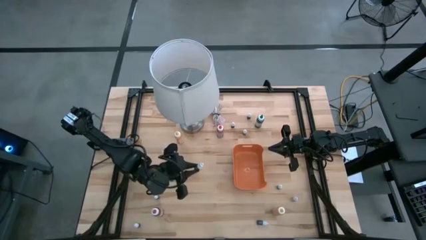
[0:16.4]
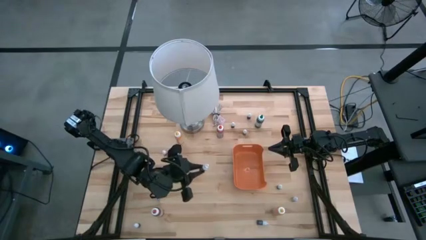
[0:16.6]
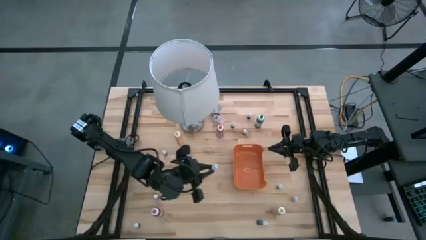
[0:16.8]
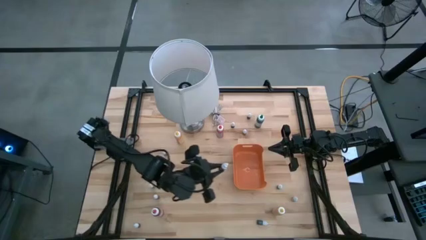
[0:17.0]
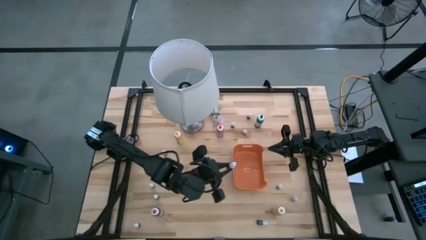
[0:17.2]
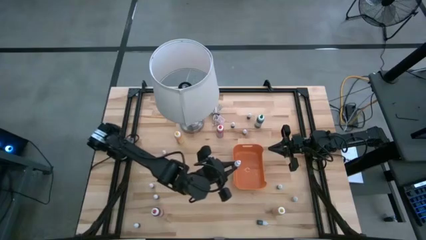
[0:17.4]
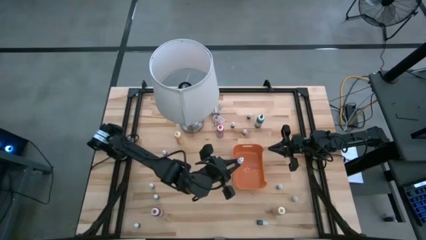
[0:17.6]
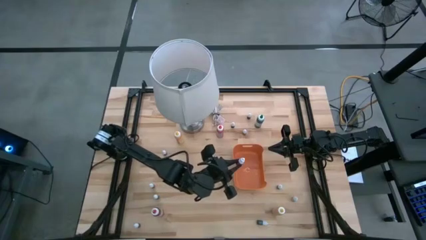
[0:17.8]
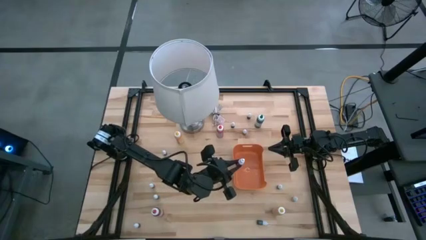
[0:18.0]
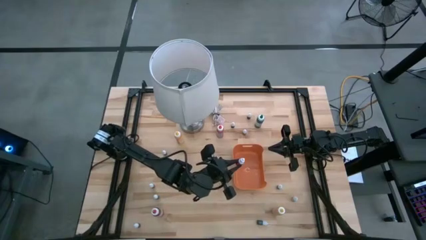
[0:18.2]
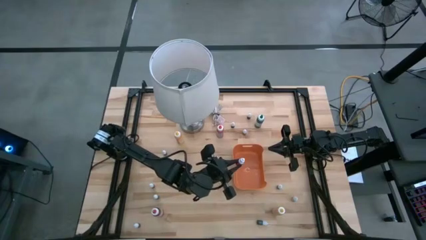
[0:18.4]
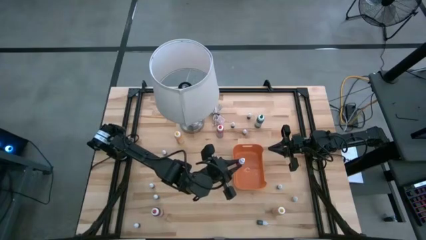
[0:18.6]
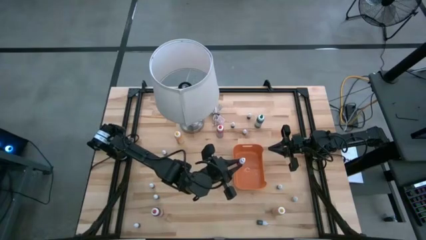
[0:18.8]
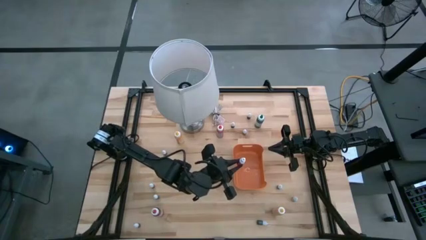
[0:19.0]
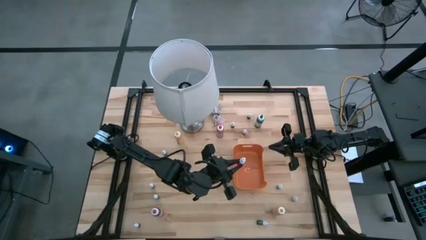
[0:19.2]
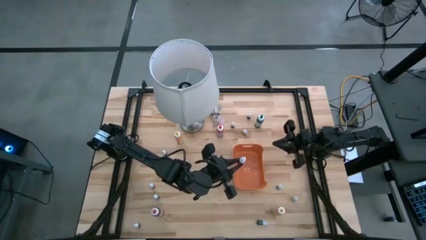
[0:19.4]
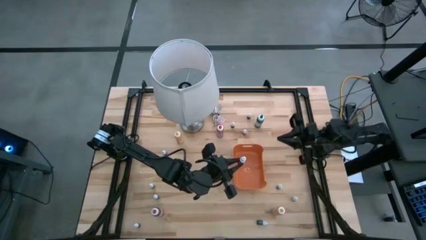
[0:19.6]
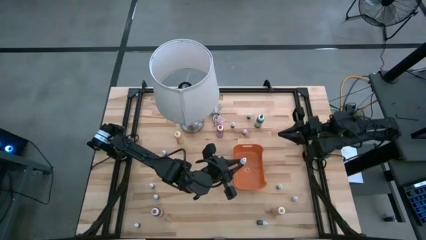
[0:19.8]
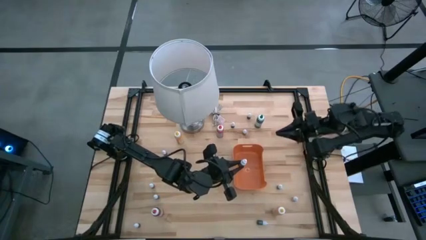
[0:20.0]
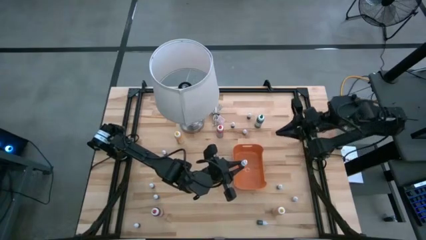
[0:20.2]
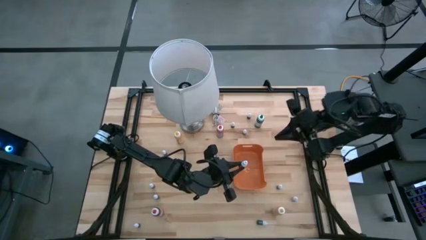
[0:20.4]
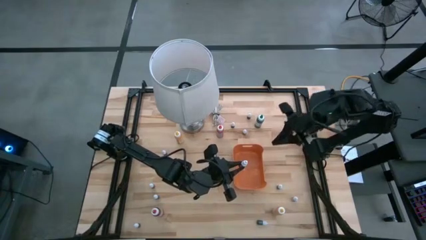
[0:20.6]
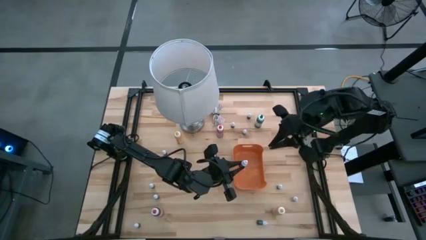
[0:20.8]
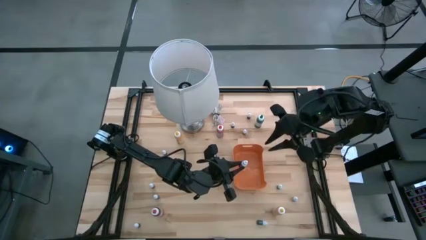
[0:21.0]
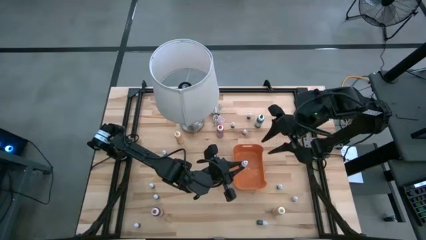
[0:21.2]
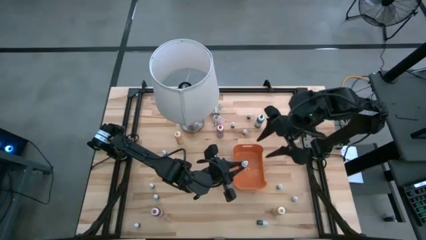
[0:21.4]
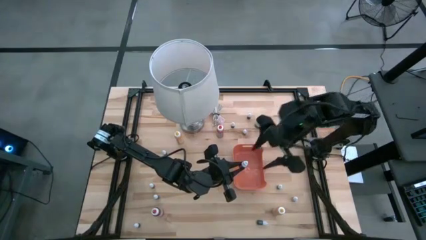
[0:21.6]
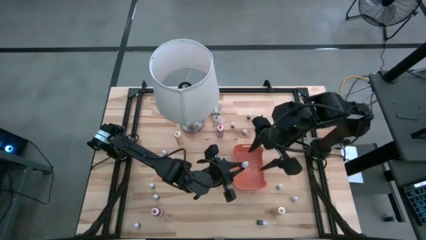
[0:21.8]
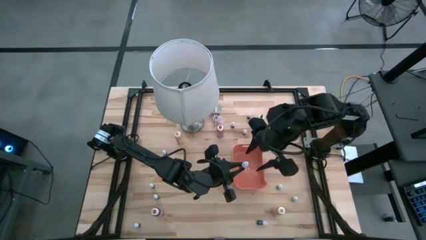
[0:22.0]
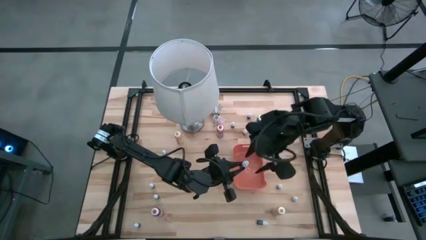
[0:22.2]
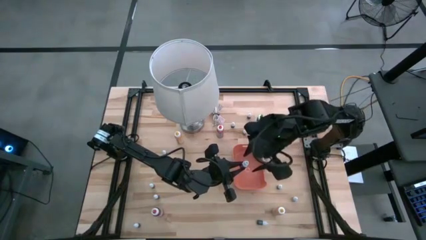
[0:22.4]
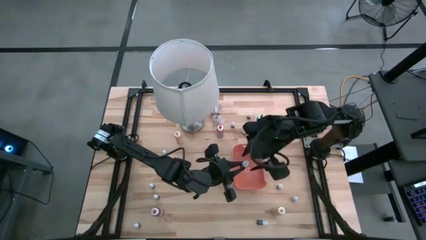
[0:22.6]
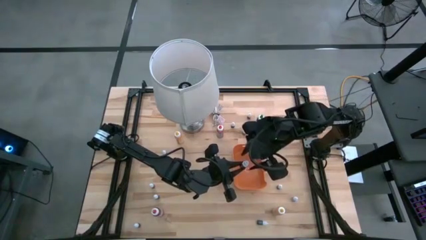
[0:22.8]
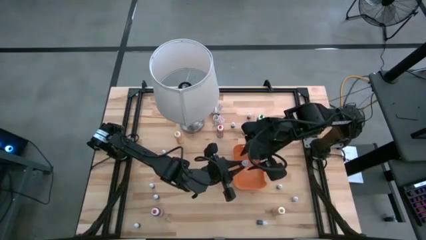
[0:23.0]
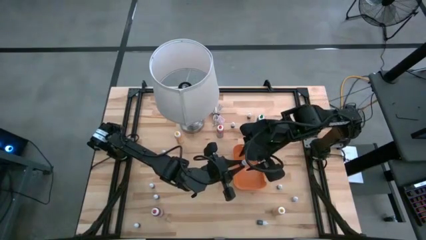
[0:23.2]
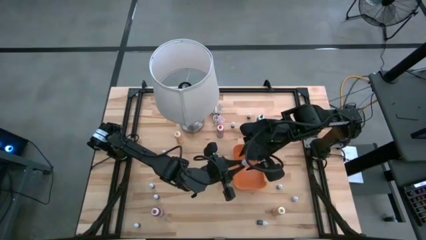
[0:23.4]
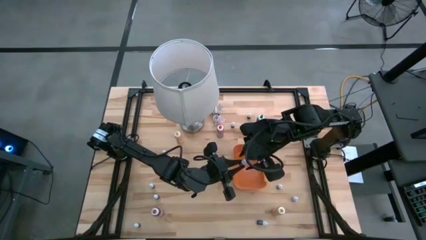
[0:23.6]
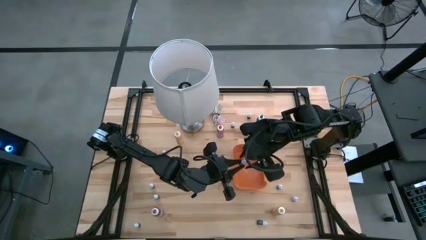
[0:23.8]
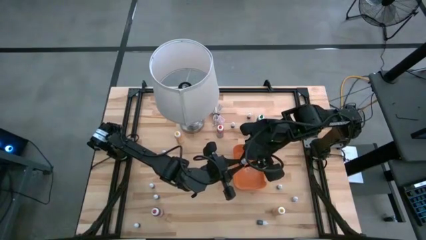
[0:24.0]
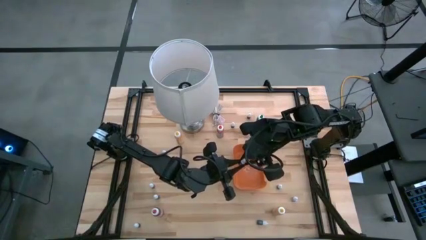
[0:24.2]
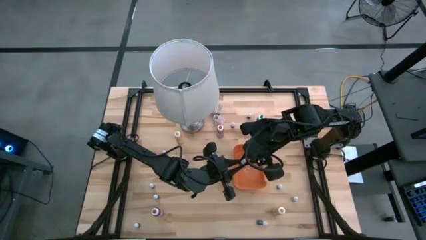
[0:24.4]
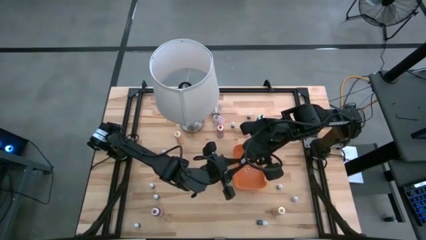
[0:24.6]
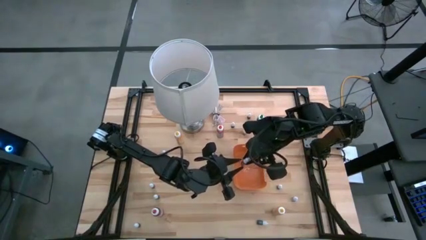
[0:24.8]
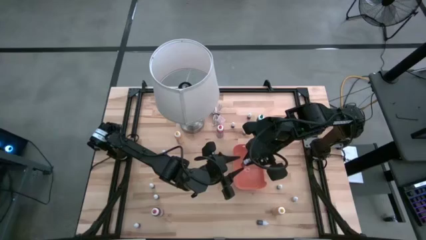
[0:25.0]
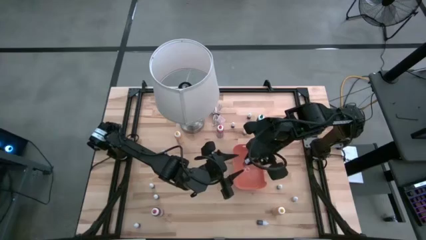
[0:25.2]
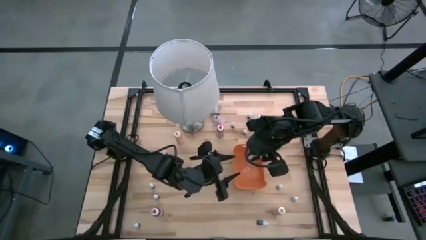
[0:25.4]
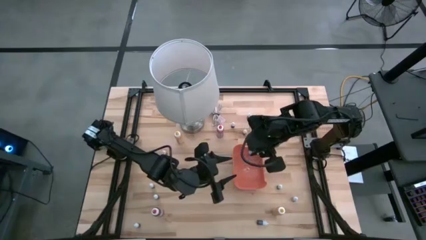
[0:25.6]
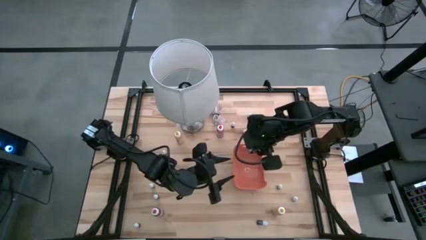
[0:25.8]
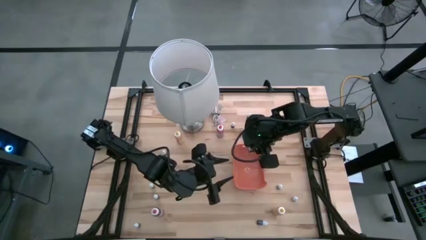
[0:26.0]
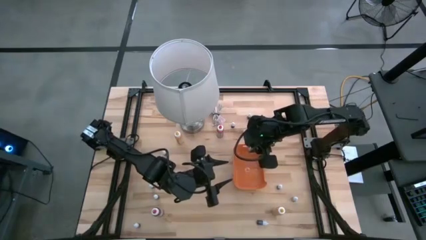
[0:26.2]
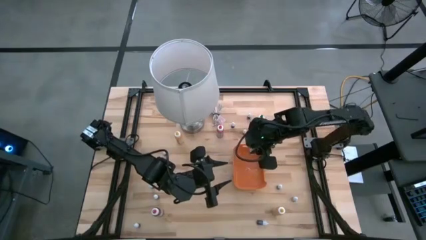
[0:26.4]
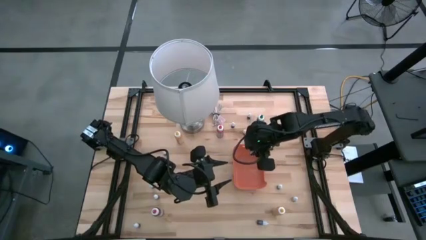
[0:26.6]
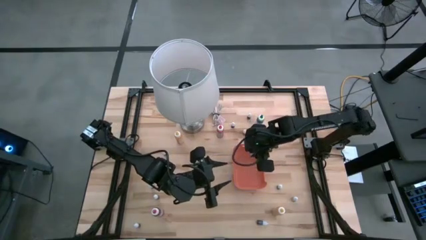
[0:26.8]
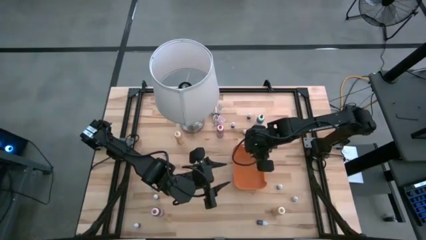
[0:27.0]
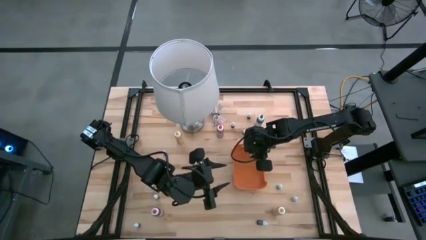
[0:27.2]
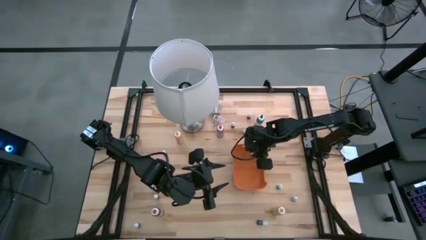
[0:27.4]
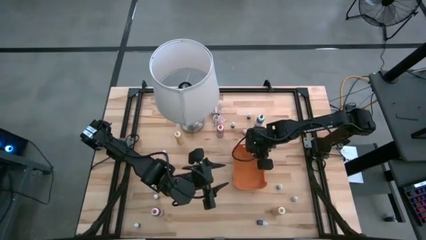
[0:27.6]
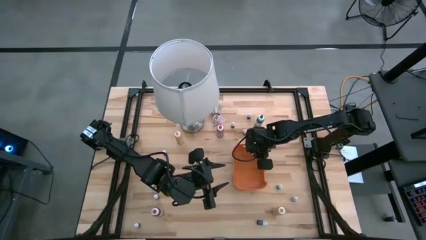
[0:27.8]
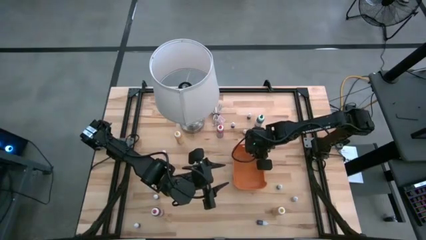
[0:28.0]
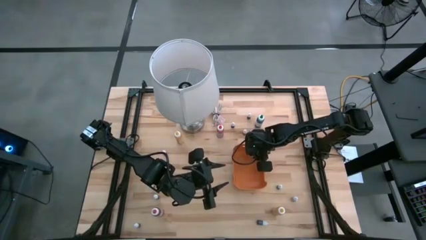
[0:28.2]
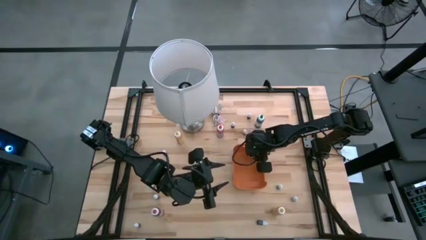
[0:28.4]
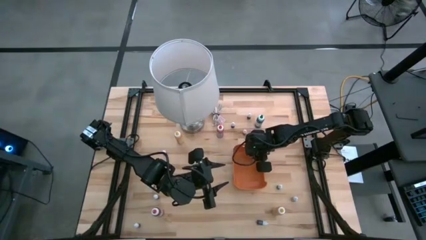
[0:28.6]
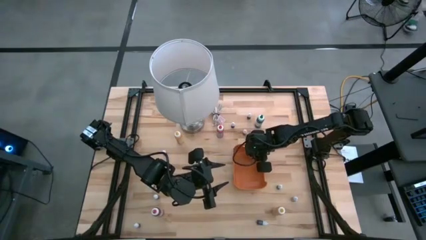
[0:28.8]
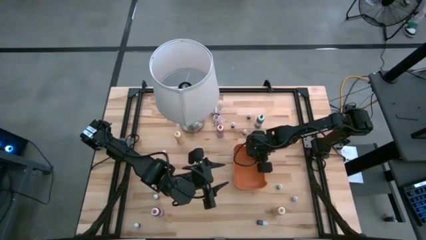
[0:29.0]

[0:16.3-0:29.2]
Task: Pick & Place food coloring
Put the small food coloring bottle into the orange bin
